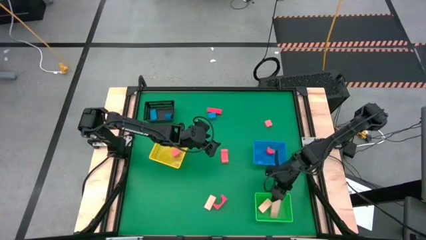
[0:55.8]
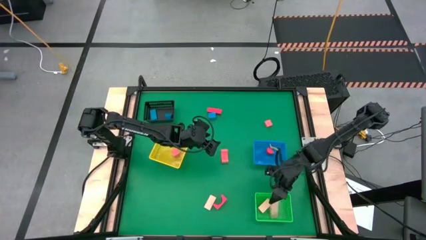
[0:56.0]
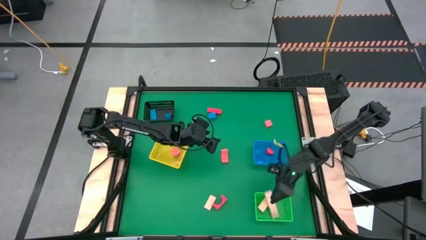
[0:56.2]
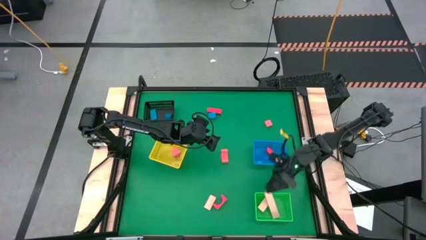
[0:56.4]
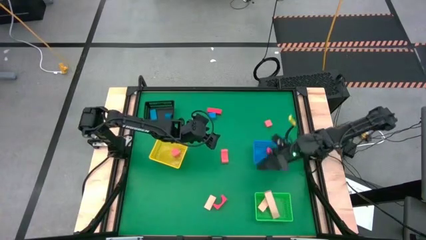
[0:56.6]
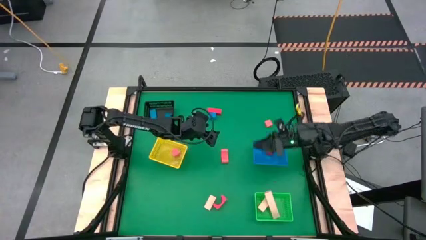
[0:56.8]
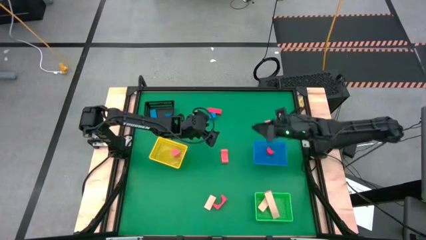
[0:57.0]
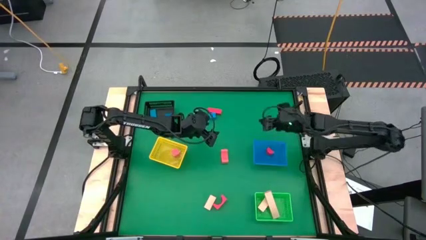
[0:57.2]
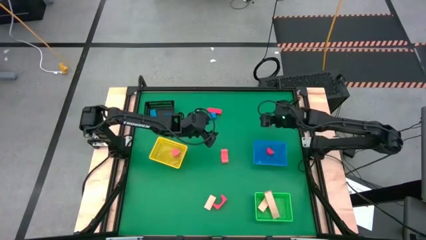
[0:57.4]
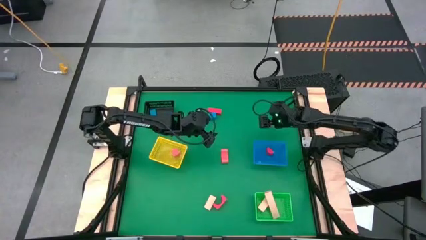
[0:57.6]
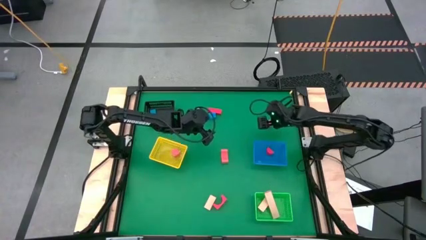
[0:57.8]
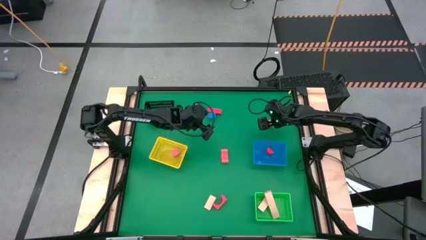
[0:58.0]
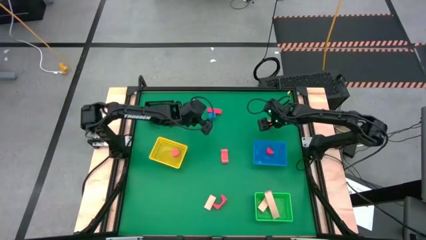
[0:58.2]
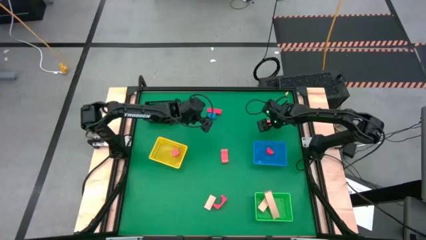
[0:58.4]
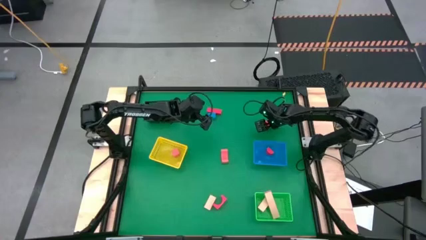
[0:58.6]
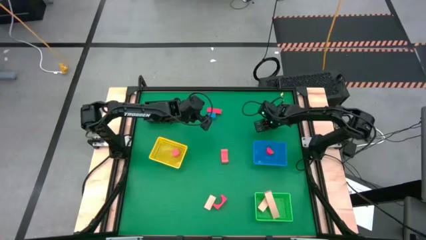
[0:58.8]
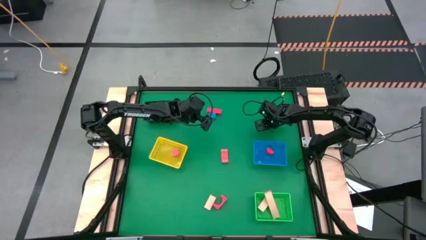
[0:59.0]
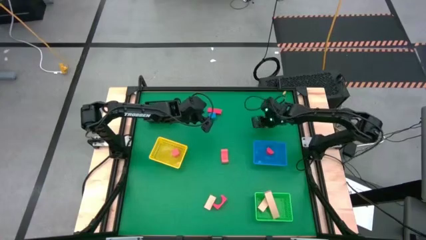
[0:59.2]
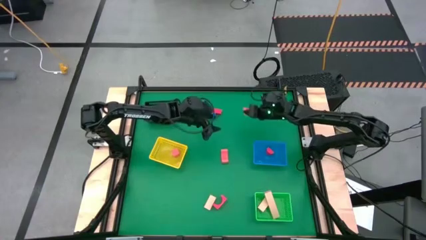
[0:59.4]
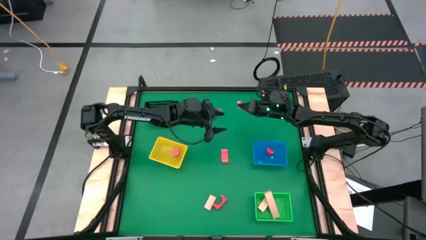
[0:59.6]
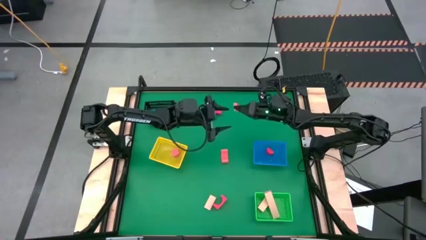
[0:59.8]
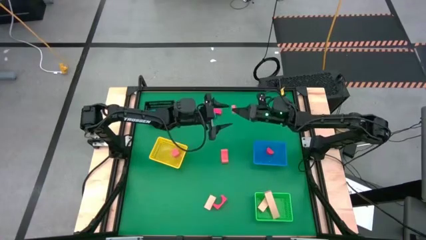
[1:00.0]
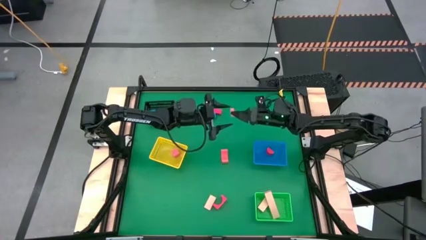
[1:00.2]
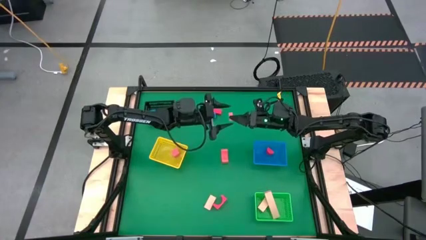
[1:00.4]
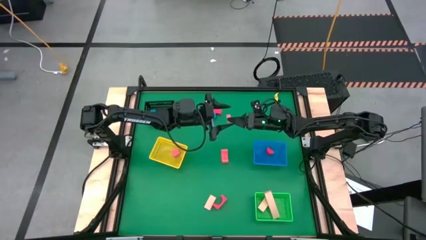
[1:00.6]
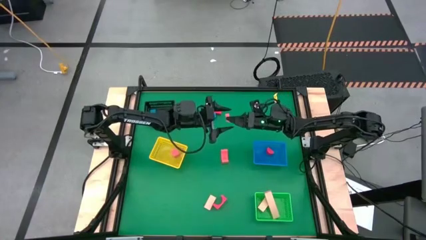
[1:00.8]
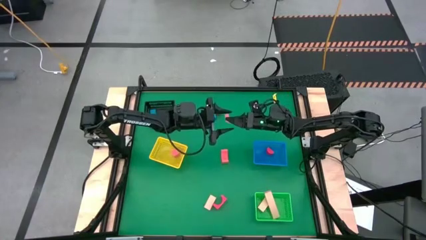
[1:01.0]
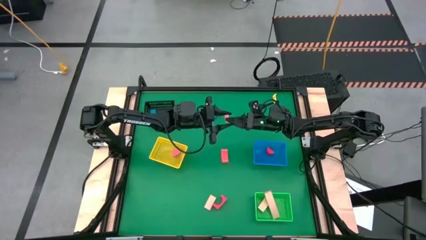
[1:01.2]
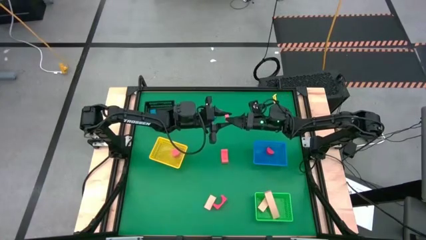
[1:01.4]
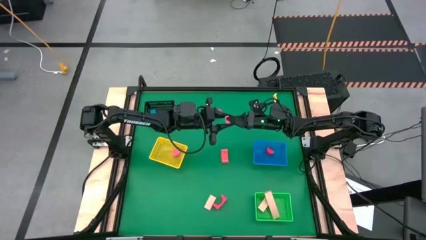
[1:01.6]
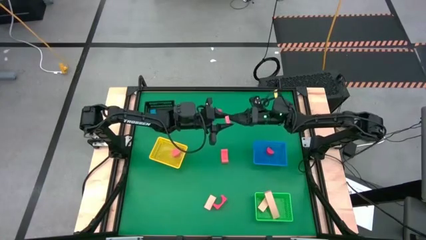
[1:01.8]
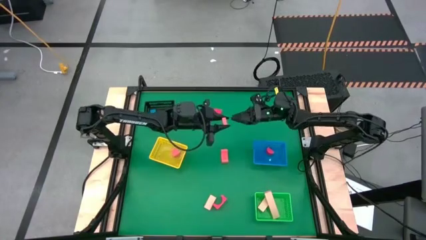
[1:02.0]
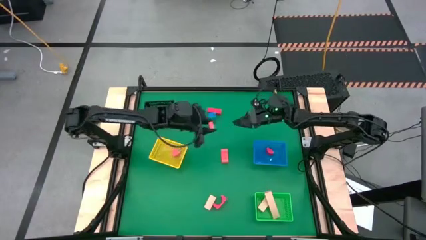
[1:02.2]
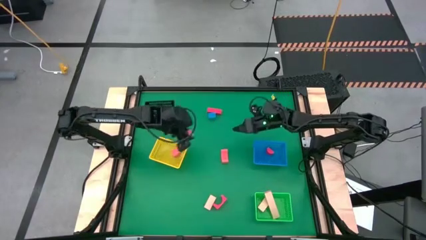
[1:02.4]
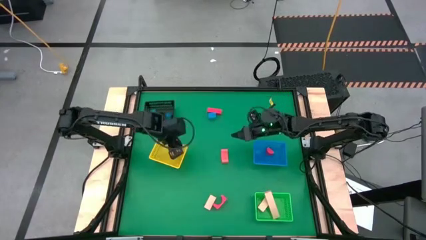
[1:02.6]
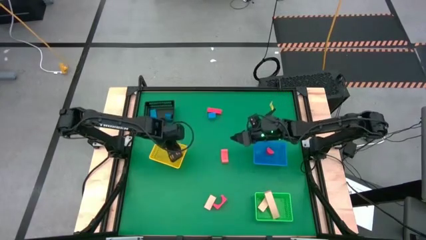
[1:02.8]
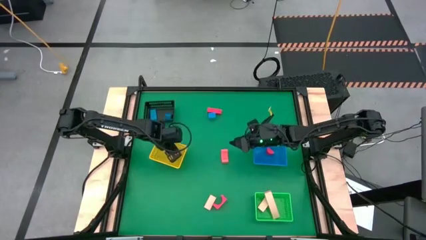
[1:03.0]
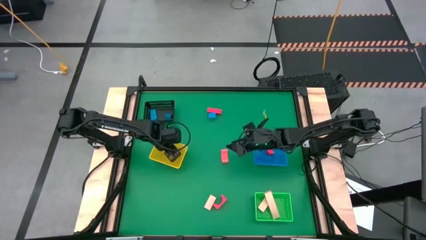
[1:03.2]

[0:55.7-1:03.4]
Task: Sort & place blocks by color
Put the pink square block into the yellow basket

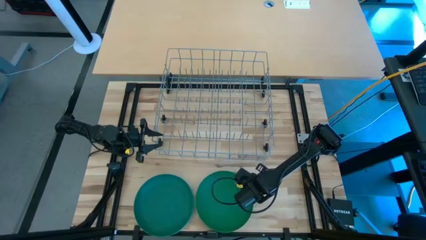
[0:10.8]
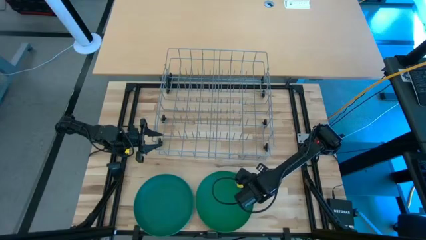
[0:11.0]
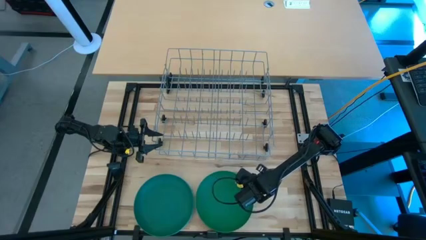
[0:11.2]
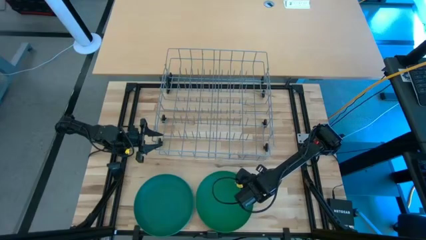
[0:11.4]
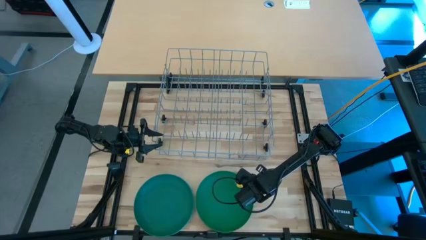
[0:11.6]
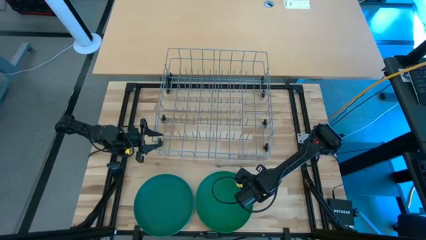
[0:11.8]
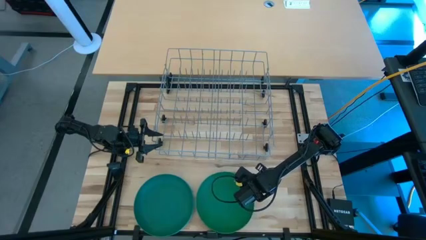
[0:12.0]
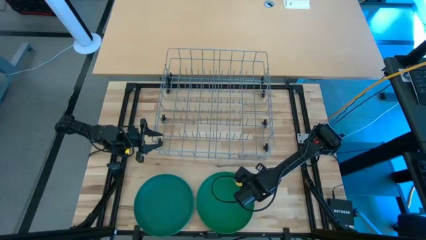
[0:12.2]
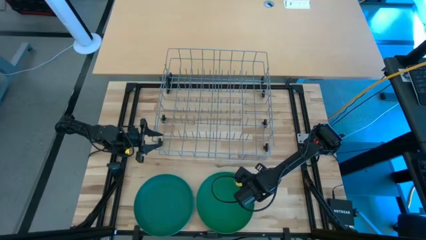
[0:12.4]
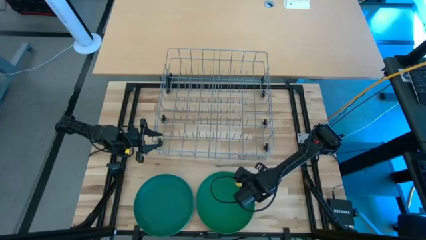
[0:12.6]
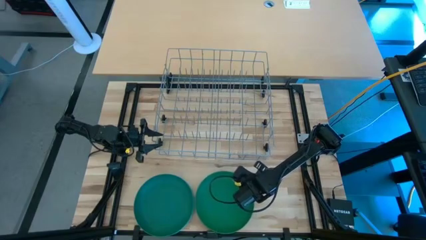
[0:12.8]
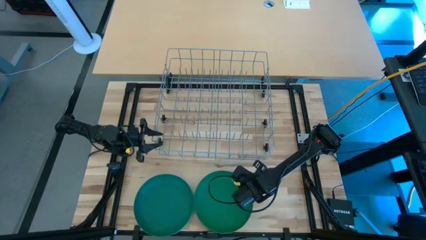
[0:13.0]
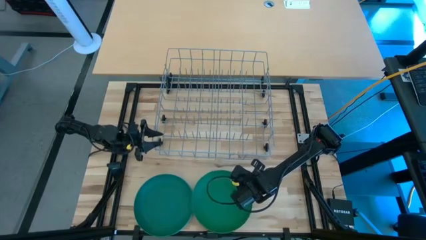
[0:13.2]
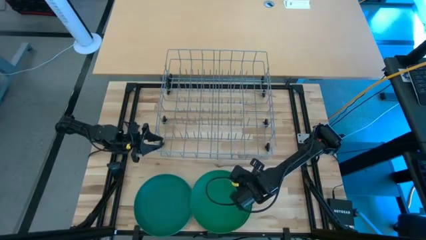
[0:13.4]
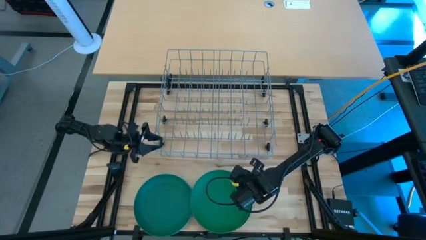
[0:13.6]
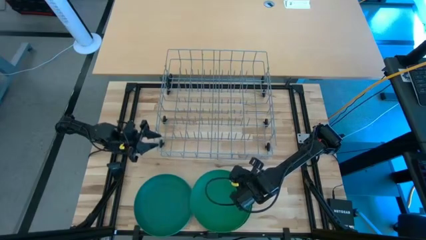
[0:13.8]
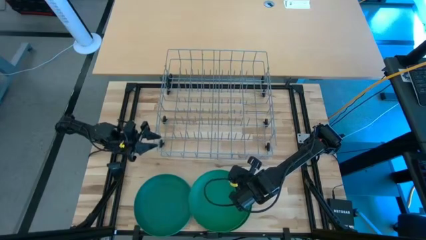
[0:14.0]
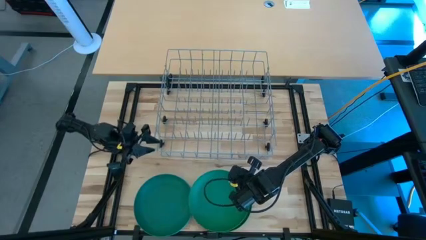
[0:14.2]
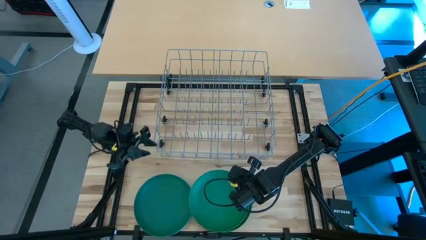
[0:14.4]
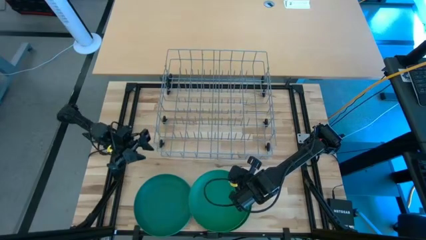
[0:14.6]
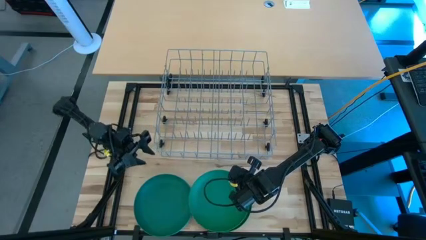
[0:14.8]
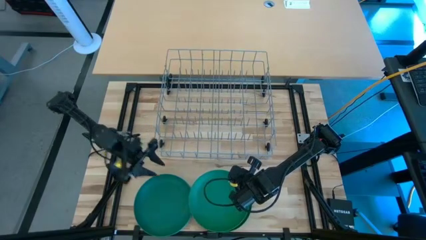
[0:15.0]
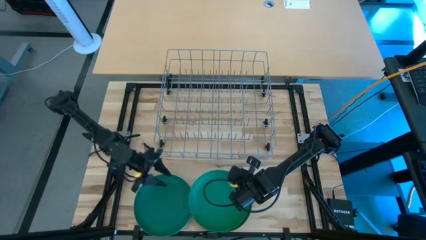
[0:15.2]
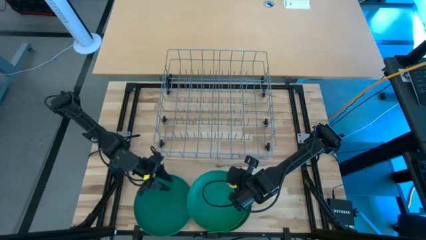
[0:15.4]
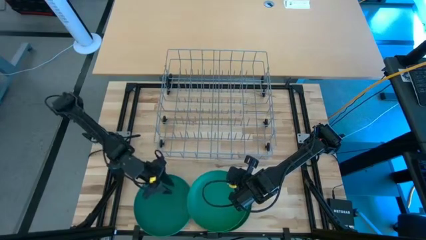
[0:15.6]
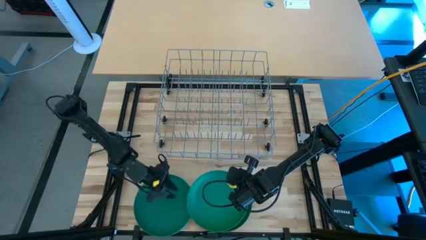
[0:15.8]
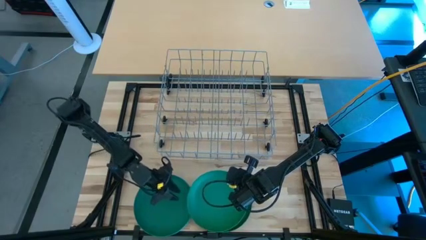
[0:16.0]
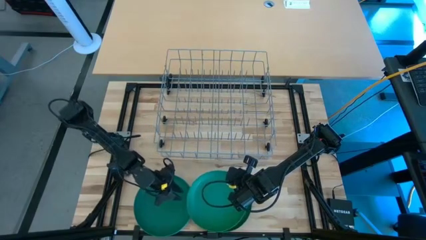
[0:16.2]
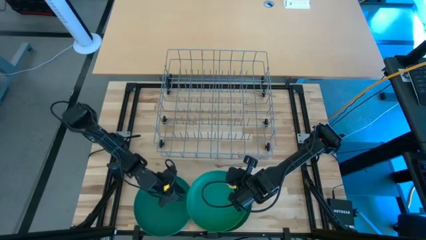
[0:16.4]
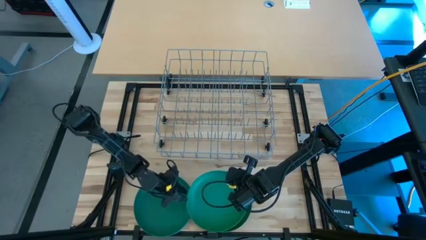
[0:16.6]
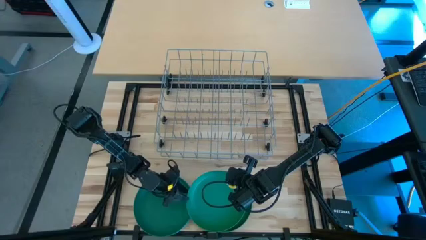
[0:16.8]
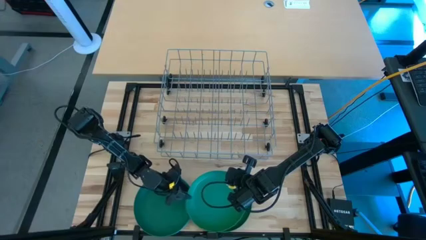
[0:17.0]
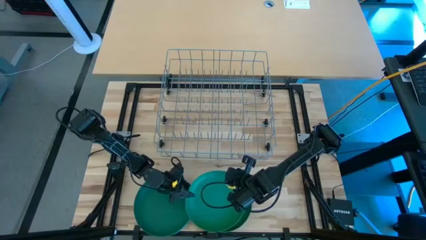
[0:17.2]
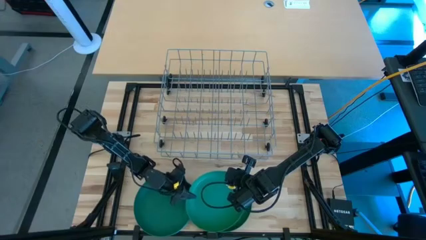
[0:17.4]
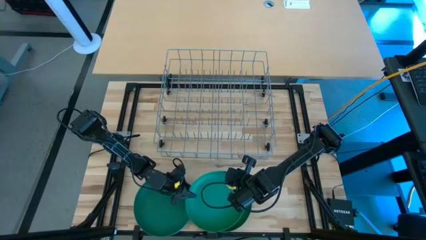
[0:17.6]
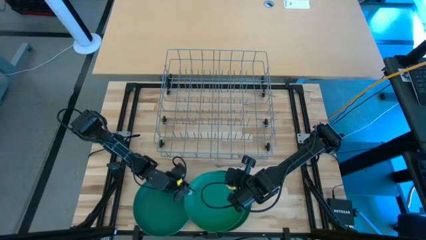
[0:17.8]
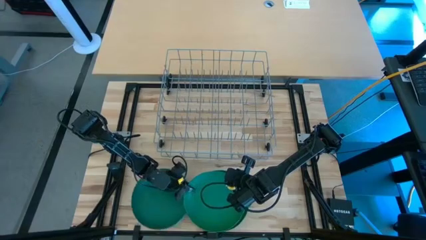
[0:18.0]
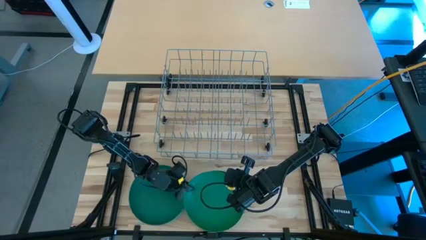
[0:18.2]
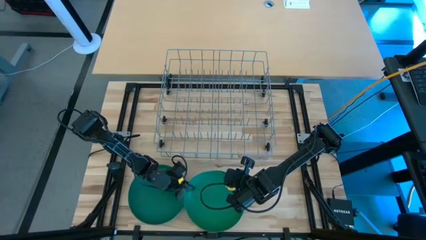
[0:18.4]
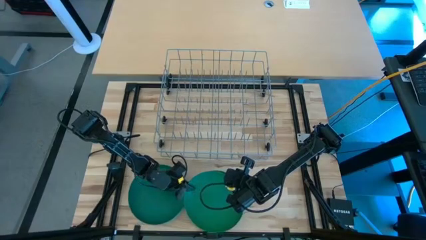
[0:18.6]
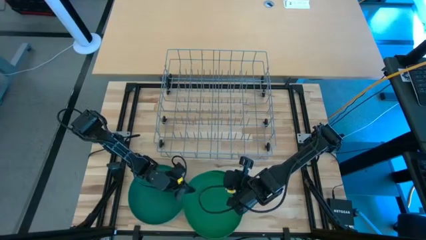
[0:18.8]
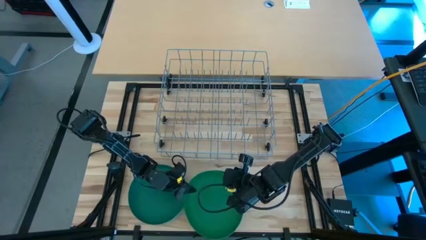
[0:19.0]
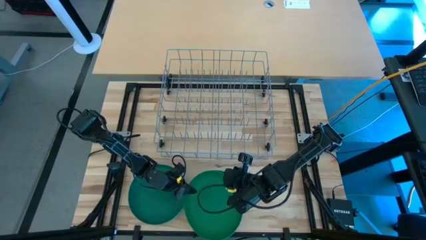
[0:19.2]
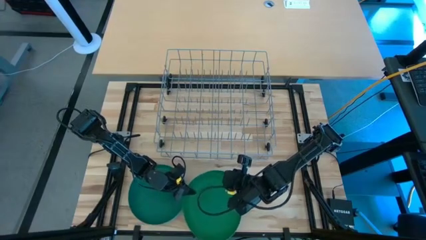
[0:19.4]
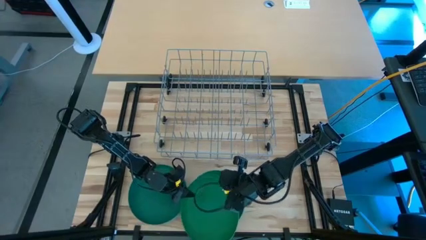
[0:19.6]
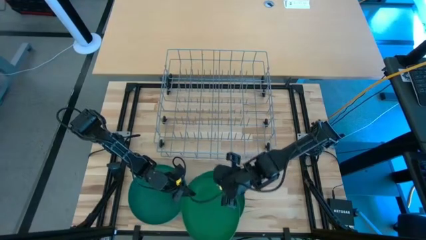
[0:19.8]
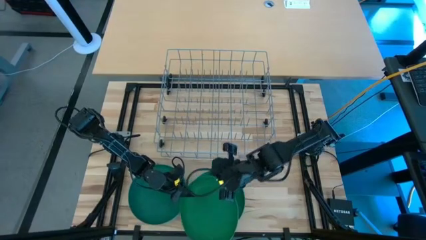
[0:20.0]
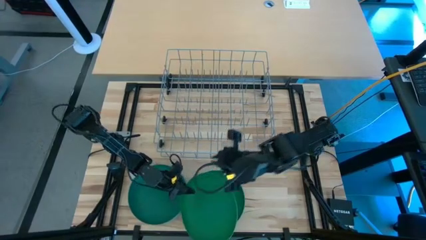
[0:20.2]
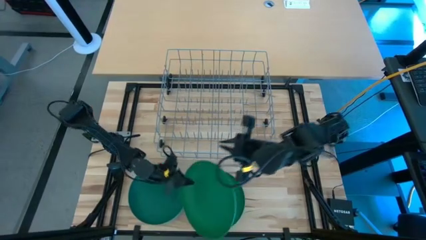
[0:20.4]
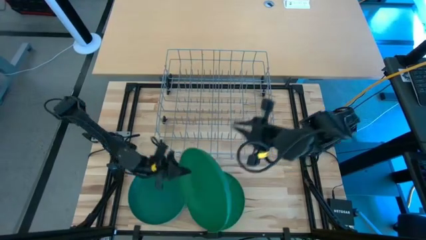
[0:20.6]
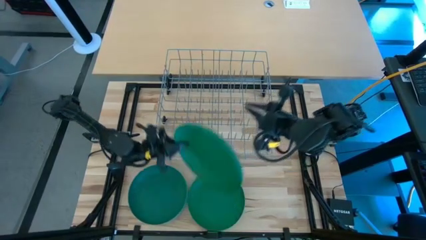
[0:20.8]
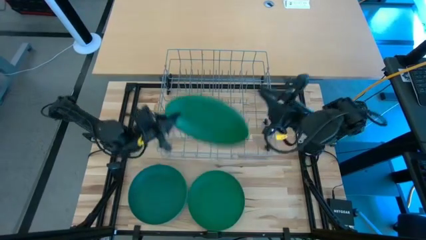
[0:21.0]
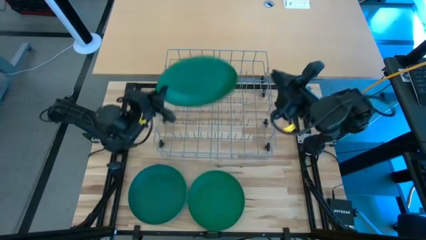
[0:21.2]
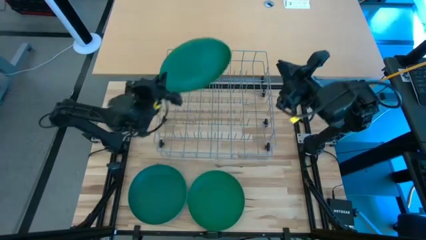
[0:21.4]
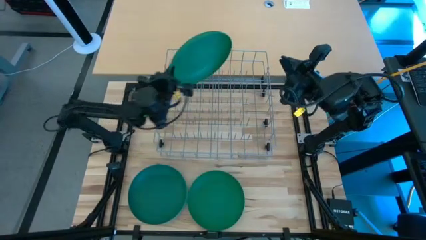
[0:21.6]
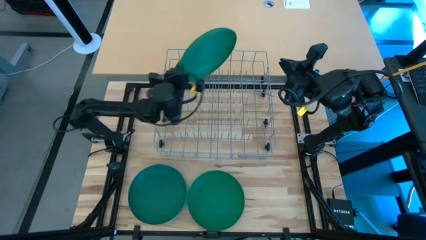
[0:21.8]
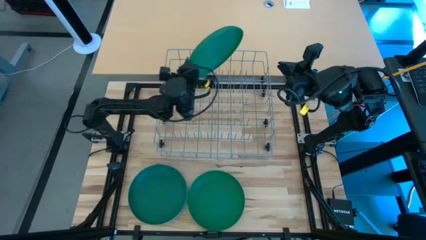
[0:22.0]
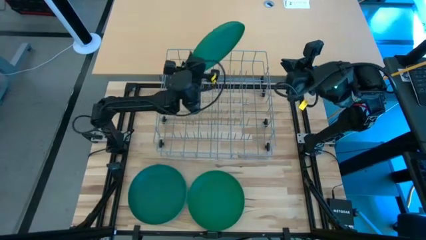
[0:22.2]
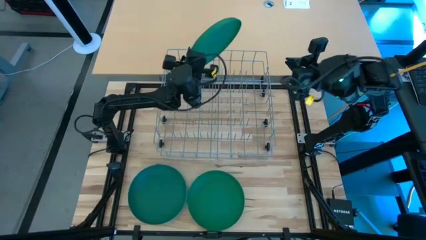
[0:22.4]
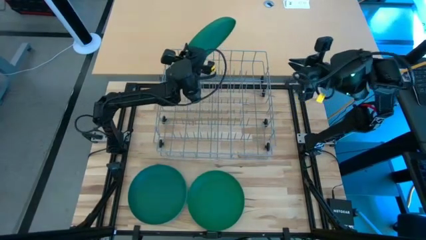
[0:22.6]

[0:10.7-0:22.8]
Task: Sort dishes
Put the right green plate in the dish rack
